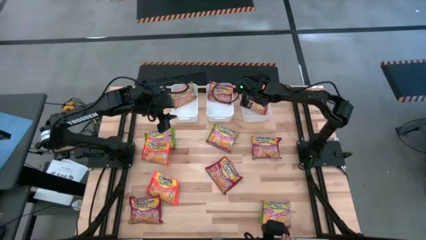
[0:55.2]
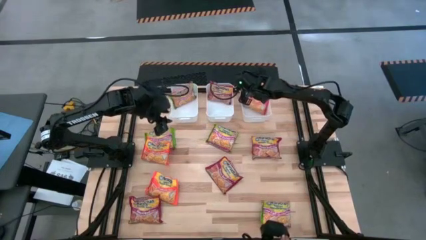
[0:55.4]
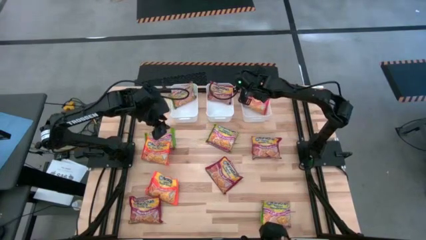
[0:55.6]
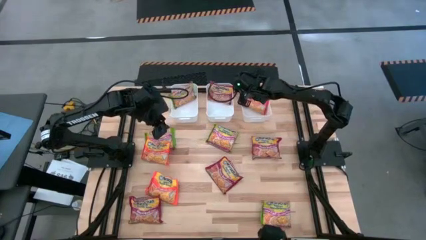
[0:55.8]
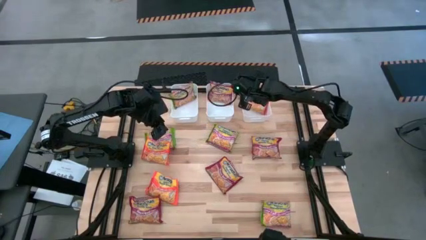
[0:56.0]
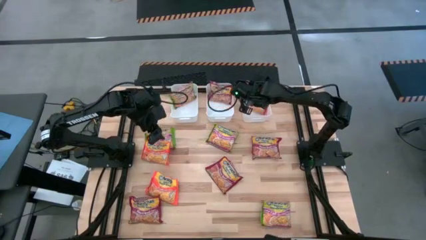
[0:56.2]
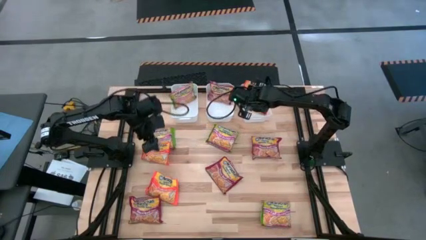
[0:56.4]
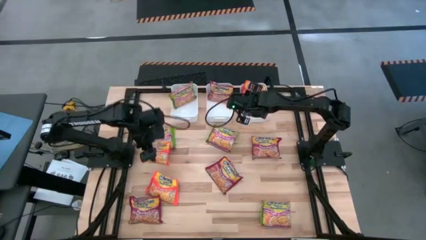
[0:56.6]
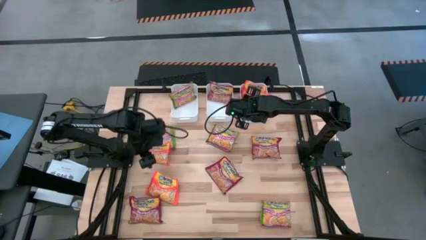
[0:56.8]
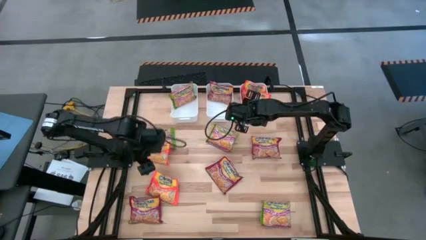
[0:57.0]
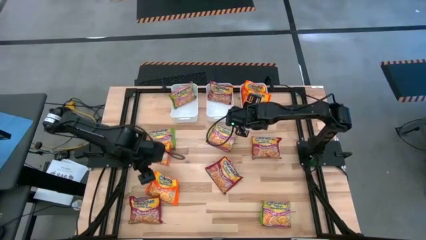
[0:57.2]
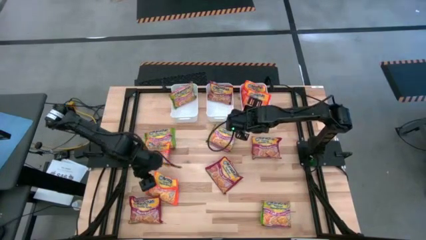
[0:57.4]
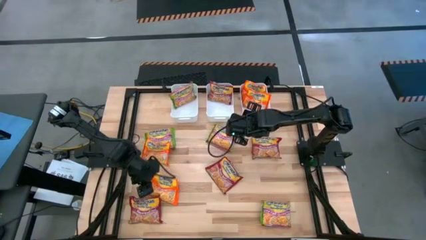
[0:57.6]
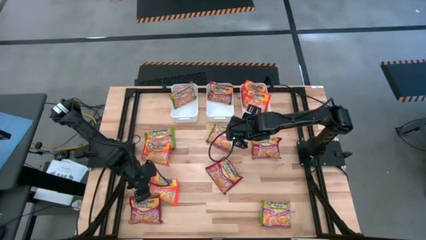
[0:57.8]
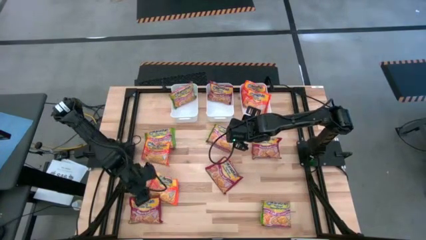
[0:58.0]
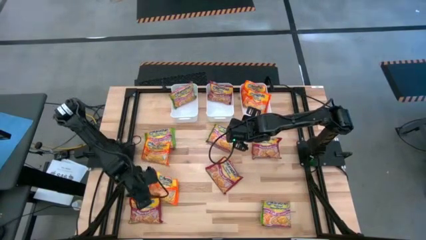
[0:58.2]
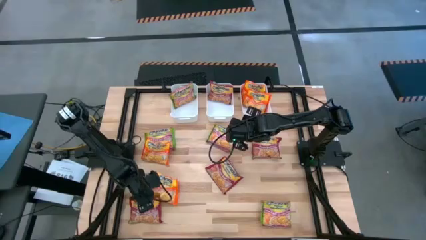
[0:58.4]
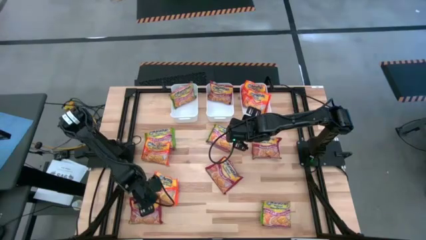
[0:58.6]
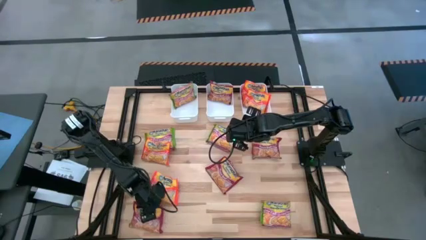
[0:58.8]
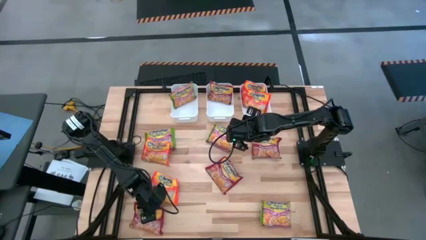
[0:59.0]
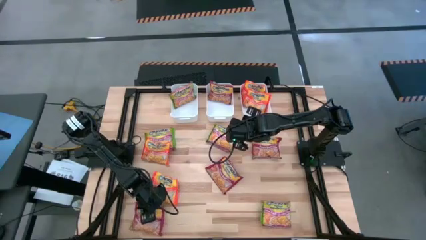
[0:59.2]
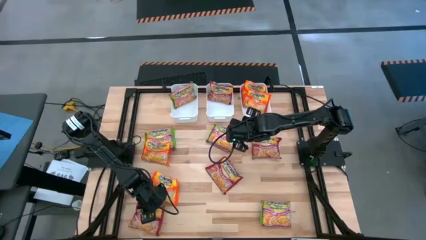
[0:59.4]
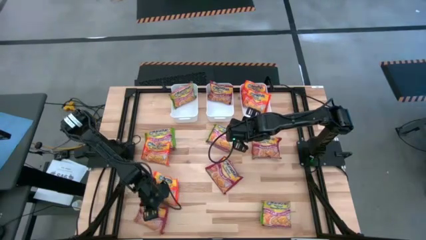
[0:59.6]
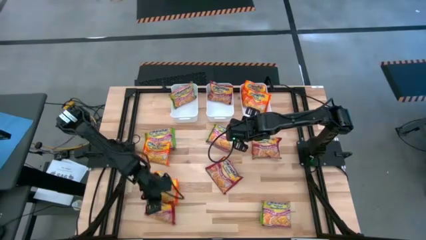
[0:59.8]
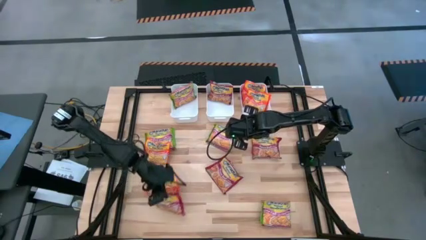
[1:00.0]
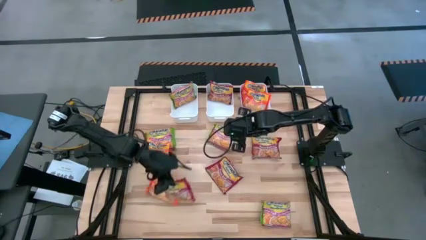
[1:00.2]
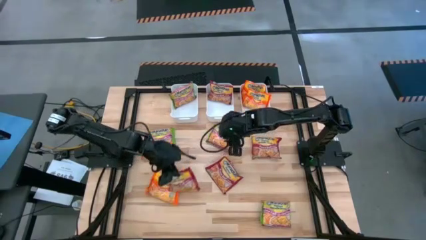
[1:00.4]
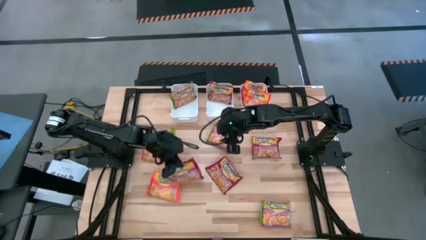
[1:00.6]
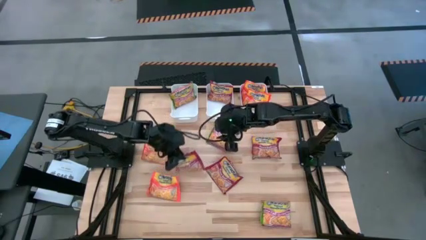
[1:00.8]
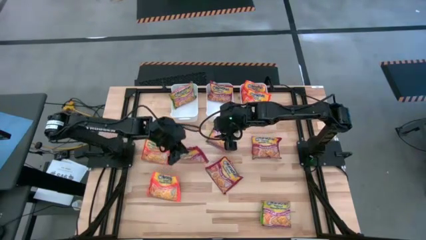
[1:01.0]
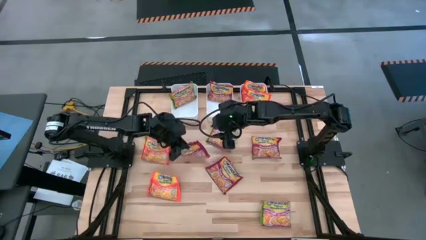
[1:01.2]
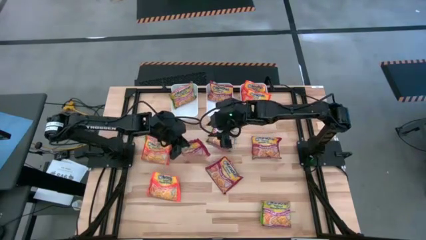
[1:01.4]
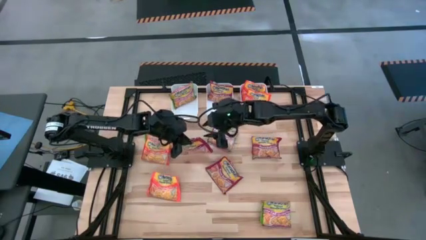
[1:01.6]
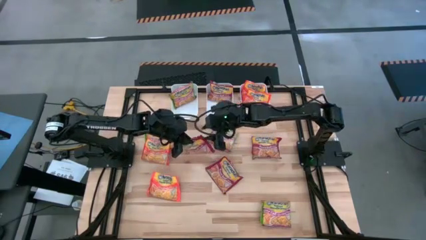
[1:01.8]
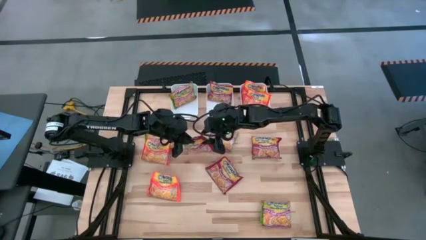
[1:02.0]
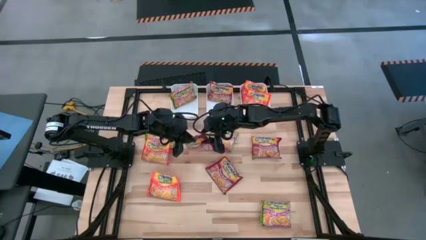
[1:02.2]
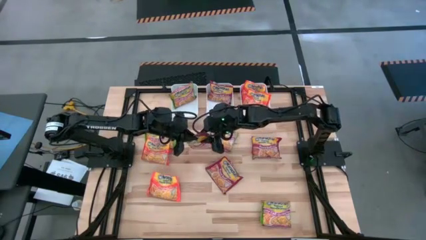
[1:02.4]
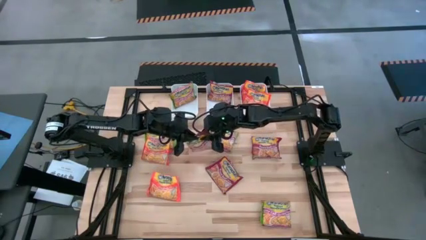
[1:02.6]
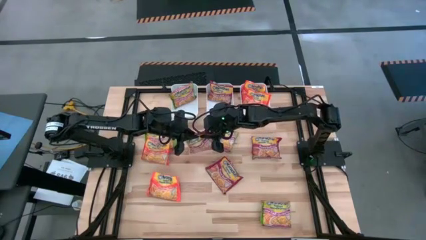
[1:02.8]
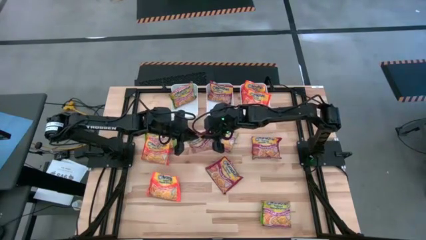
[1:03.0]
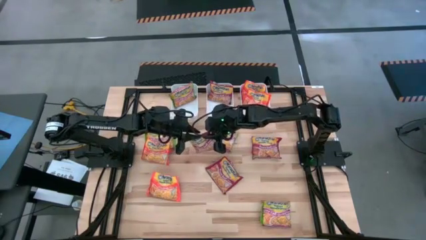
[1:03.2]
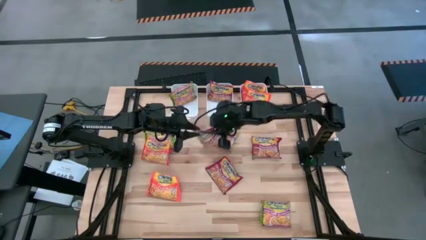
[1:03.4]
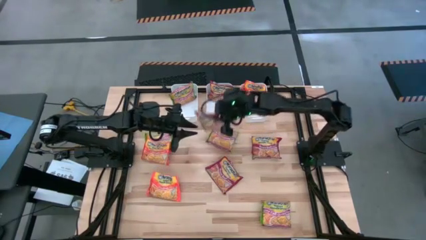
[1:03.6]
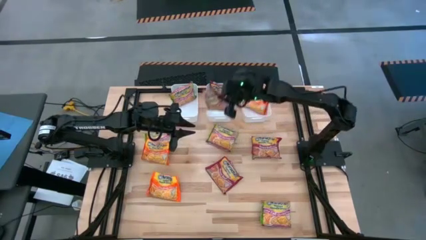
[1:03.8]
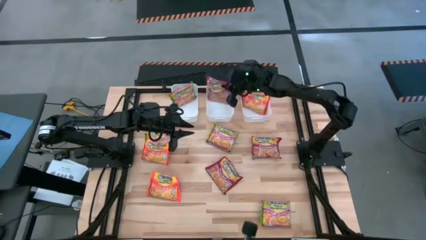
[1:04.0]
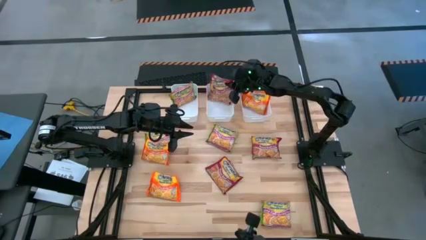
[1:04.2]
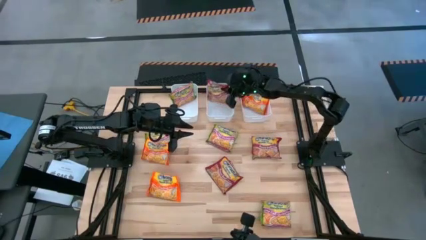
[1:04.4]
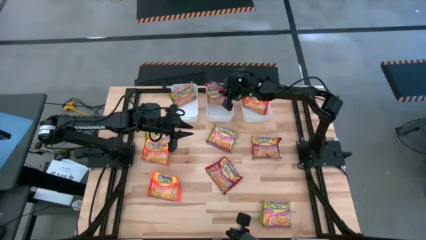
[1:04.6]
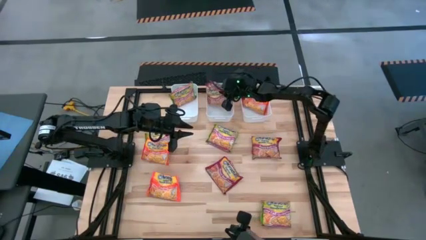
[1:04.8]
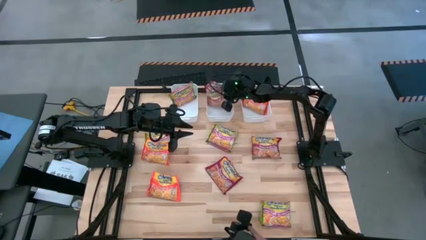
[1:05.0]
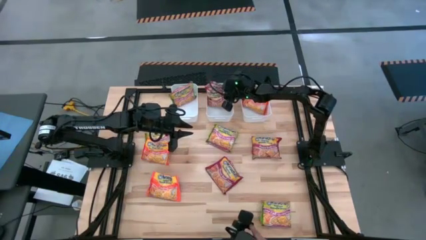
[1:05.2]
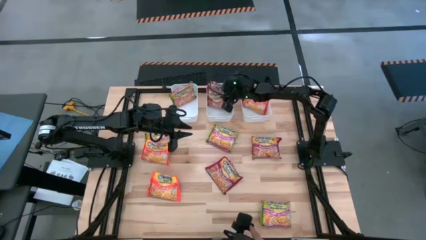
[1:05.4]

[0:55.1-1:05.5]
Task: Sort Maruchan noodles
Put the red noodle pack into the center white bin

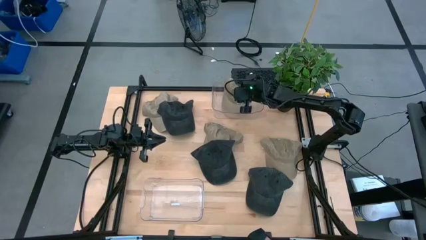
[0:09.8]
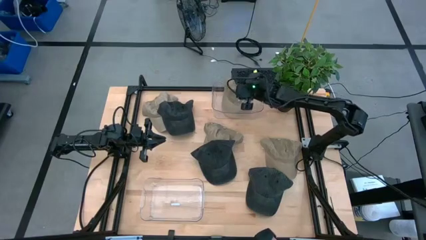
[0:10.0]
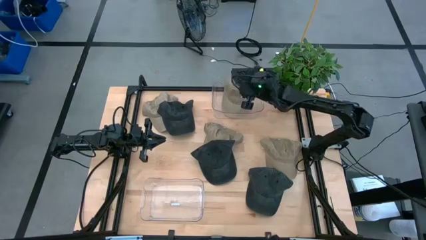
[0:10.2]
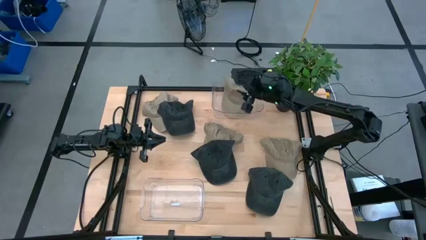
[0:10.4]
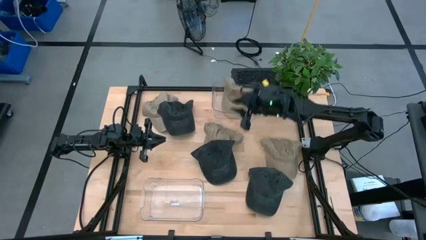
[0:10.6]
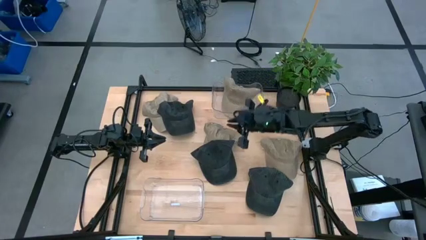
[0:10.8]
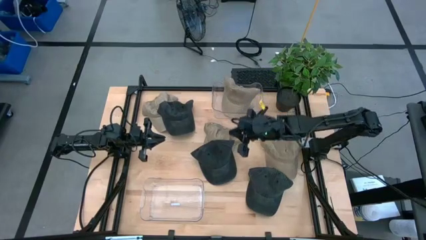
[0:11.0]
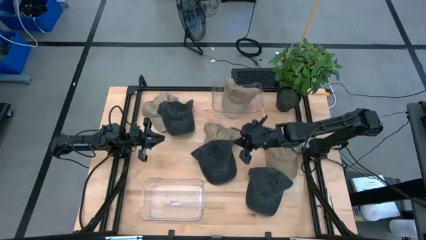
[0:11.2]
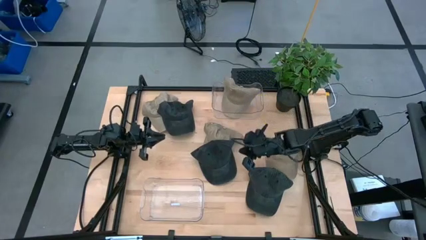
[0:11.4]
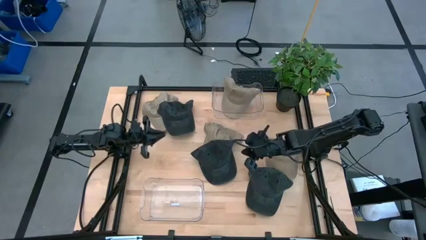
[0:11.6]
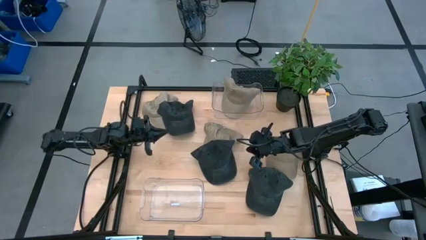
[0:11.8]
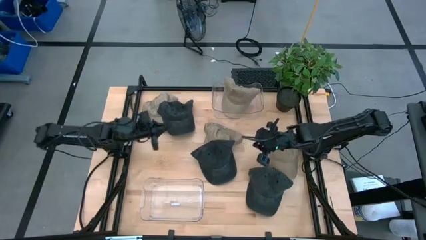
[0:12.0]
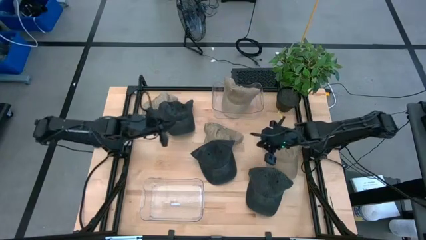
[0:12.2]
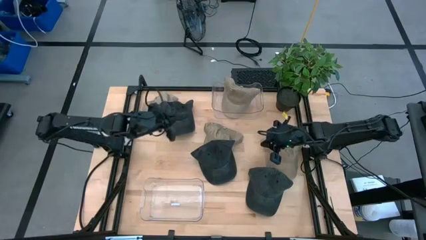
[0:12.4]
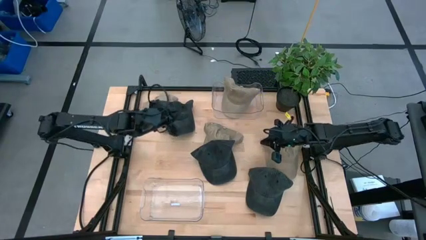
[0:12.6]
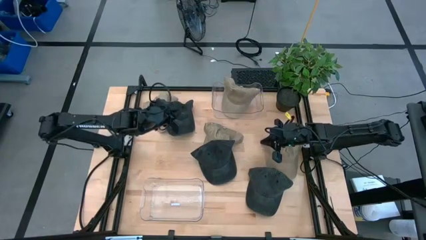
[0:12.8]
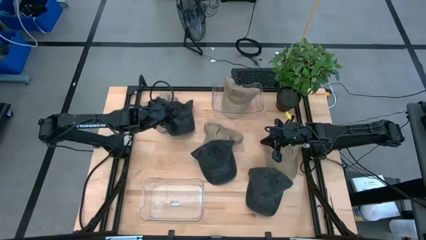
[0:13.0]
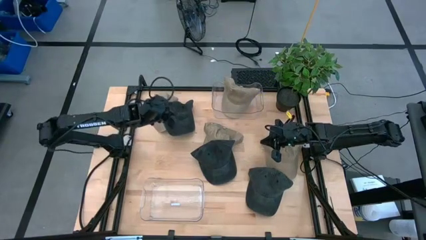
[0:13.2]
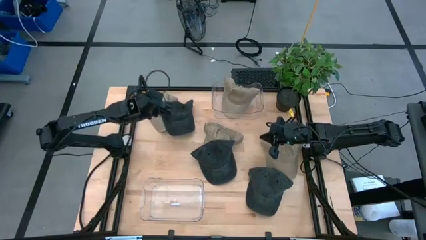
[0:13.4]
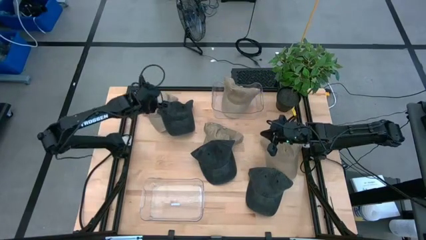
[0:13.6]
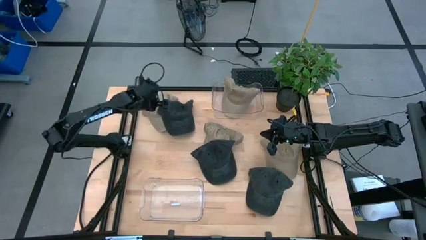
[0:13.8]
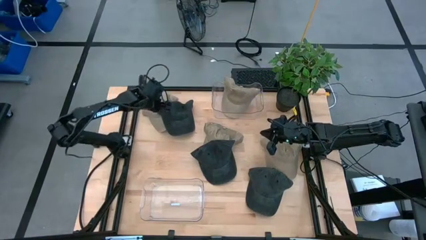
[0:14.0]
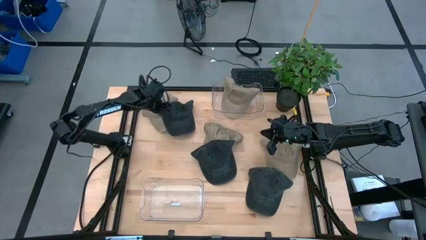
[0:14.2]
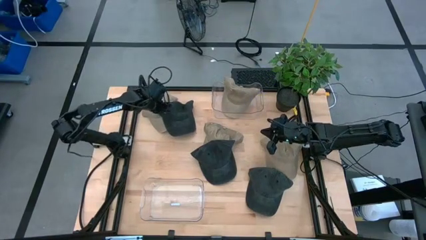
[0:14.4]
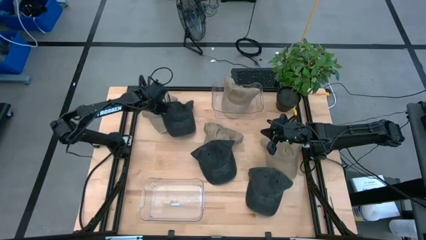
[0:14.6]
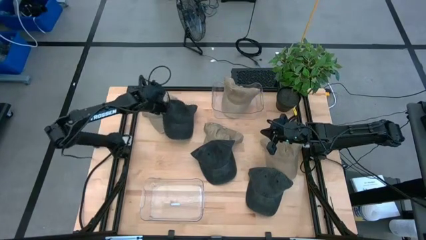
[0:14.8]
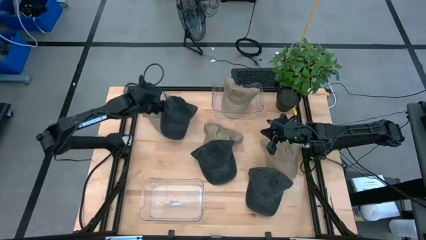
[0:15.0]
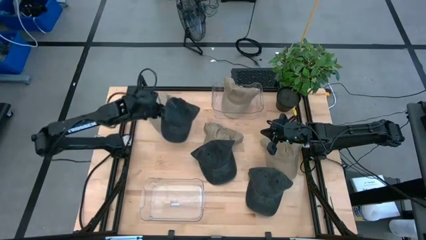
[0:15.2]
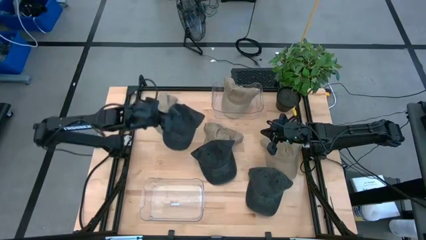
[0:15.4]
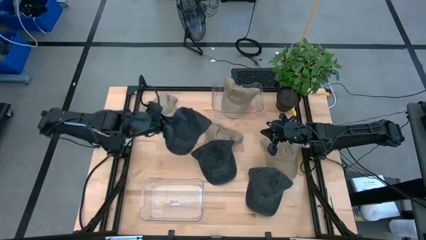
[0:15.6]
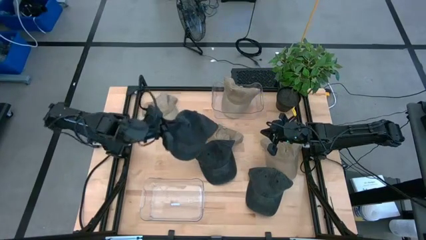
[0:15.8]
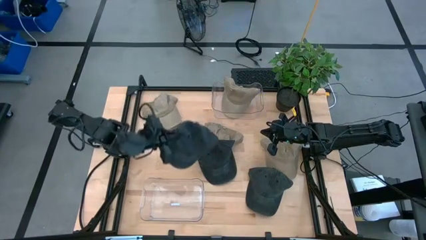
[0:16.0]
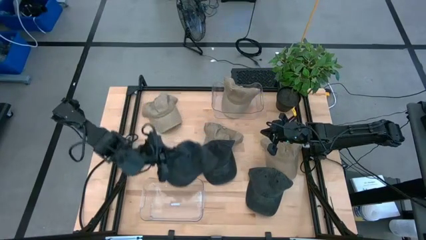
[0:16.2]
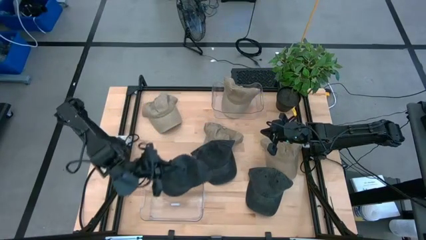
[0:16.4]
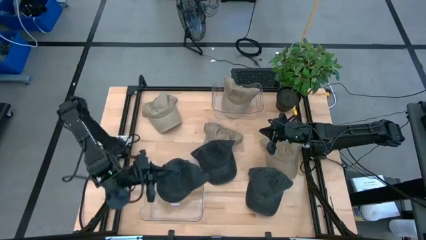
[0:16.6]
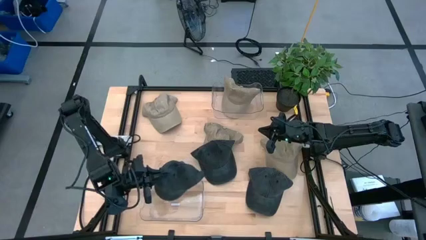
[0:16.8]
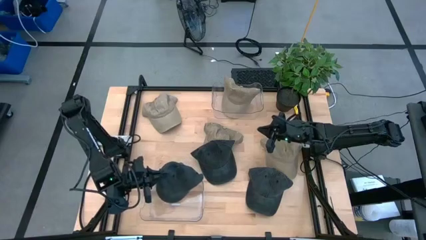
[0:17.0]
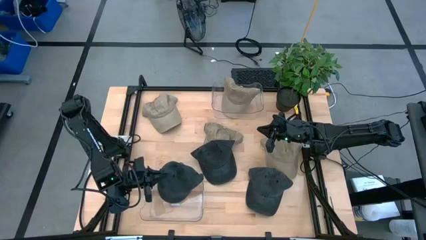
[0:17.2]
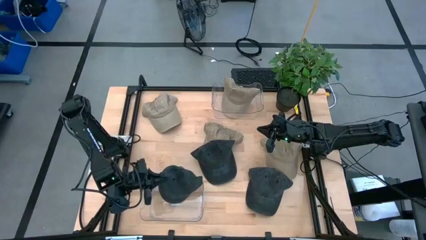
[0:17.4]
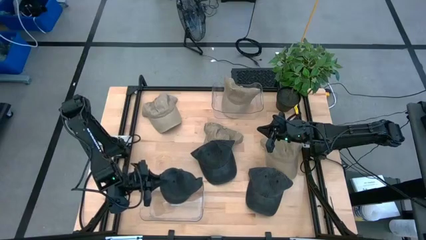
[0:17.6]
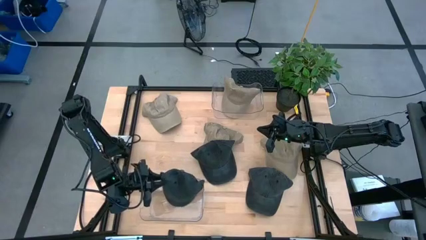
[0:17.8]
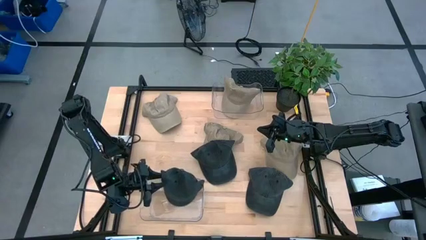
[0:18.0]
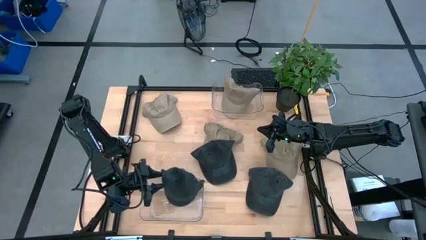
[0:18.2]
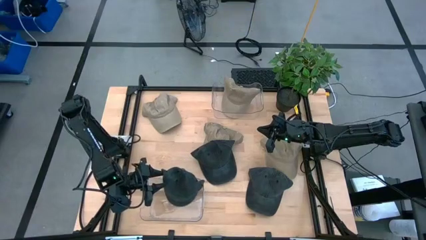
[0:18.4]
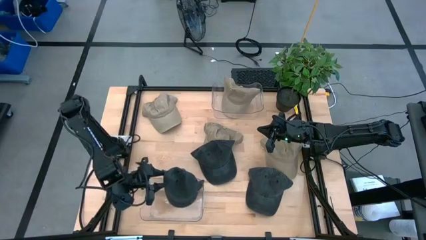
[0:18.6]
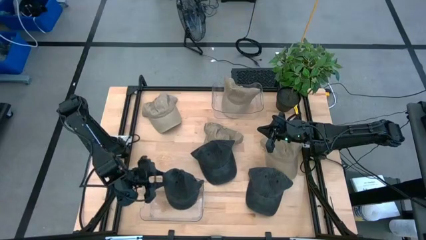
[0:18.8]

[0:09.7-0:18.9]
Task: Pick & Place hat
Put the black cap into the bottom transparent bin
